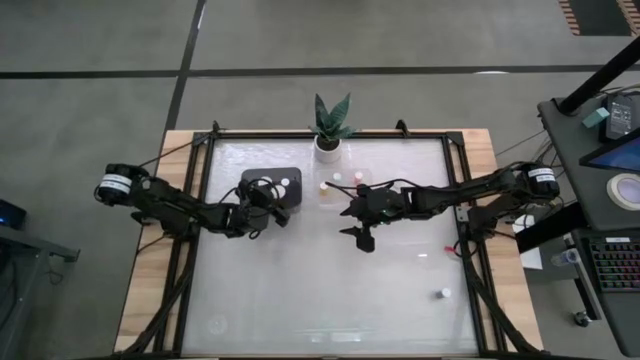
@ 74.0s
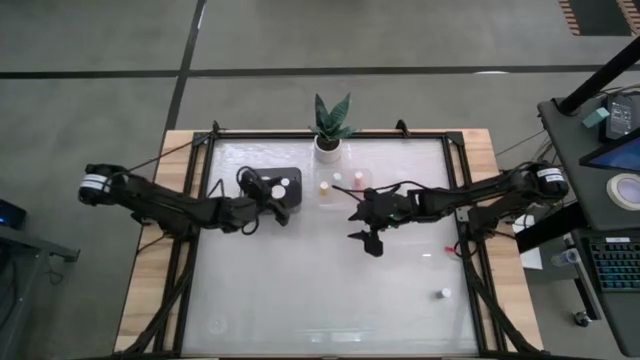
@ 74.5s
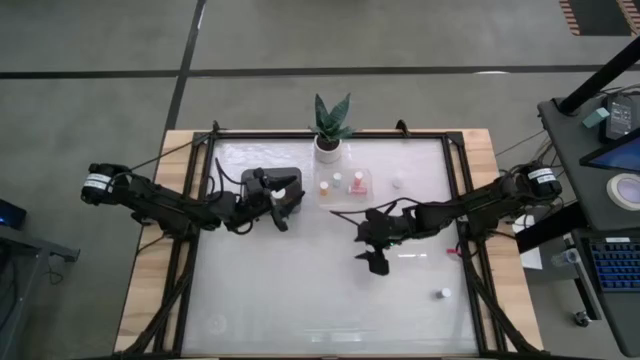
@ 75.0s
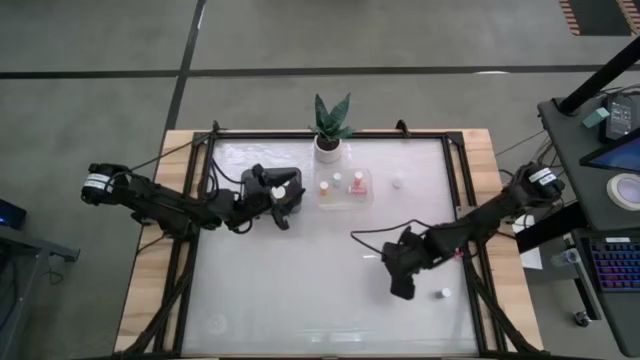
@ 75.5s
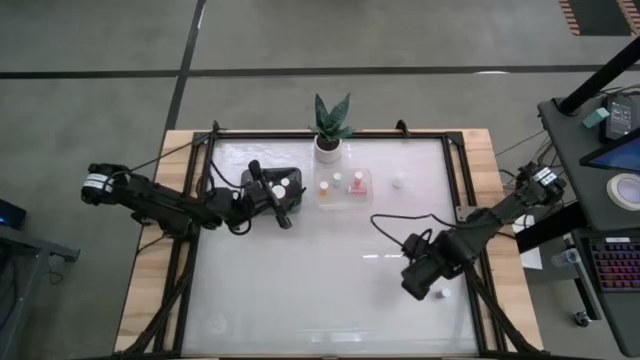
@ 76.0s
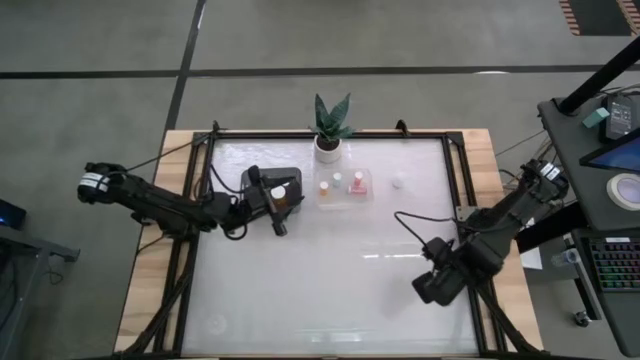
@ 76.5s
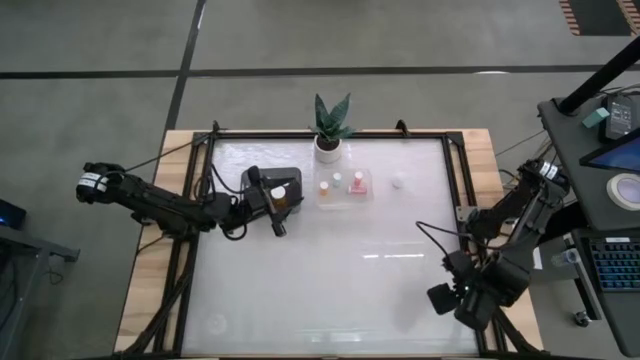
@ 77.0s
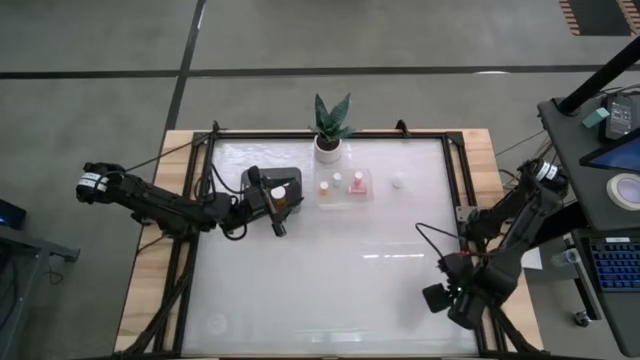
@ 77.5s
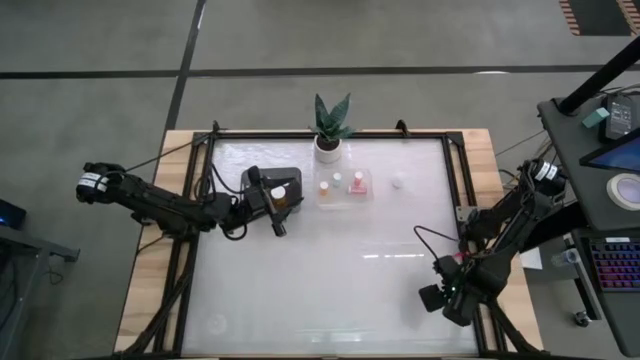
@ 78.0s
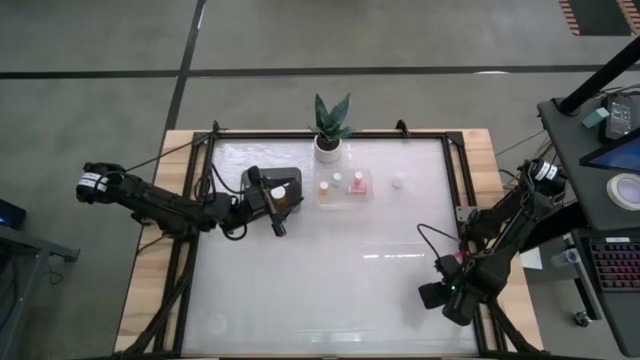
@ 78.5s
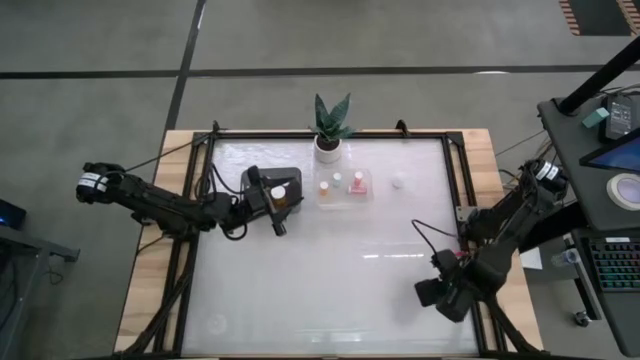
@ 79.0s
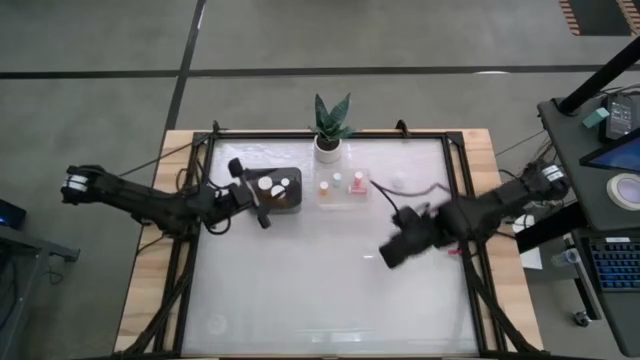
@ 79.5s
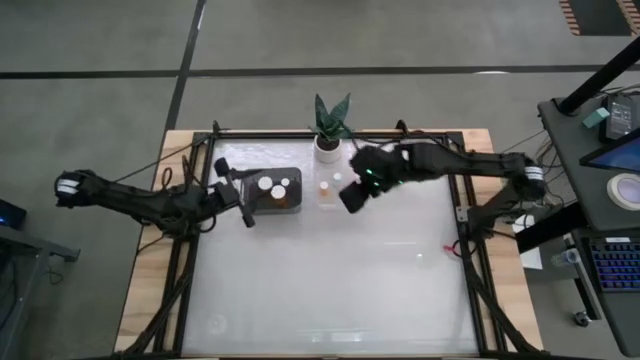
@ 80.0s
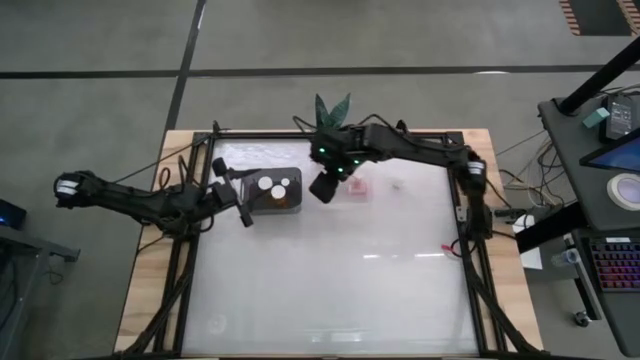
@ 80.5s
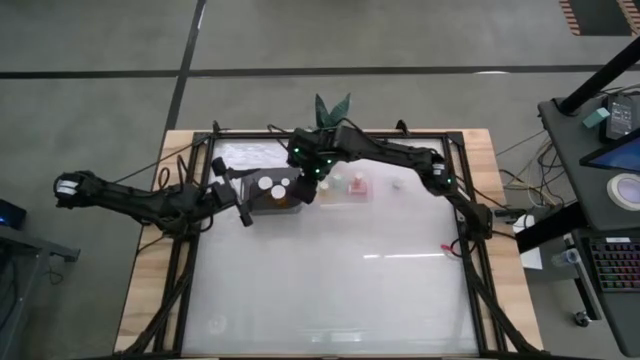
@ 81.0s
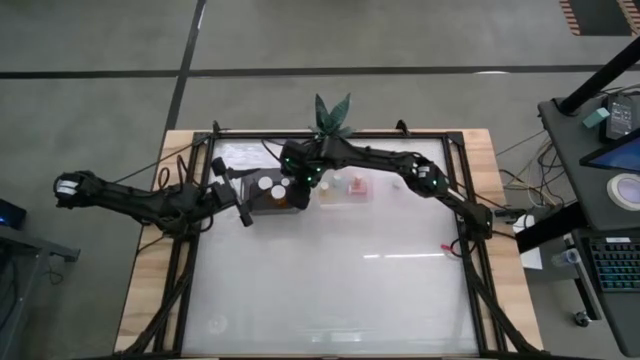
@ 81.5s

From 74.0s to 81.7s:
Task: Pick and place medicine bottles into bin by pill shape (circle, oval)
Put the blue capsule bottle into the black bin

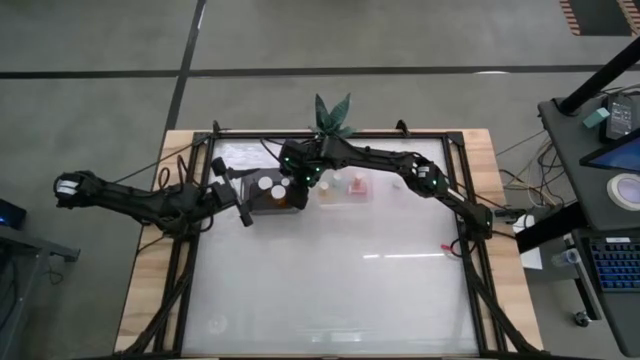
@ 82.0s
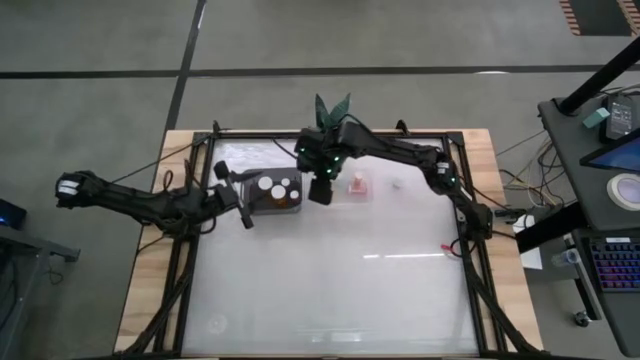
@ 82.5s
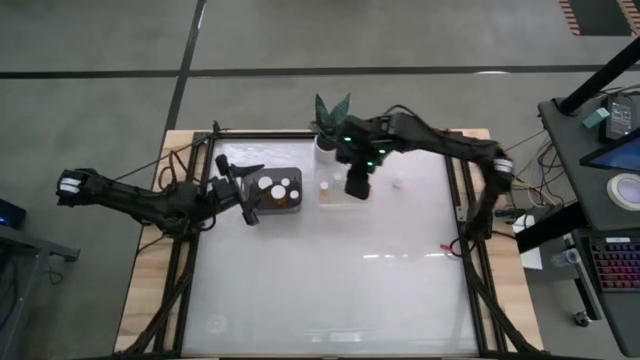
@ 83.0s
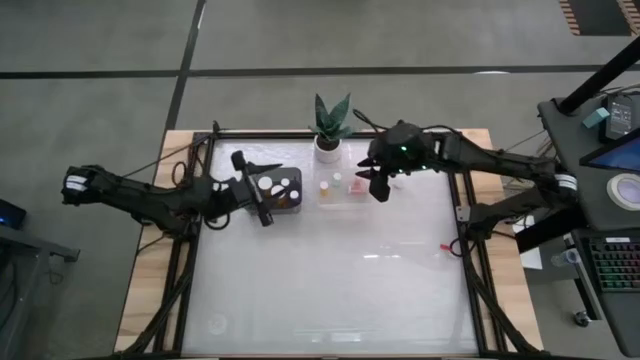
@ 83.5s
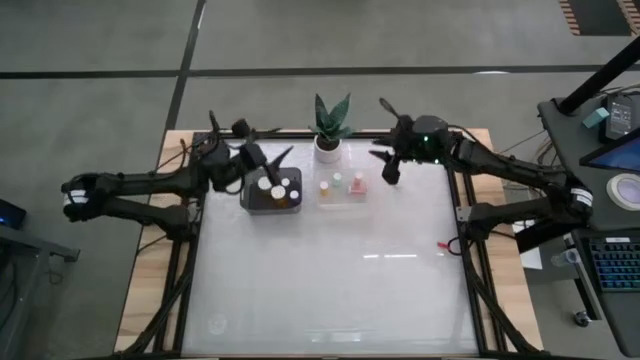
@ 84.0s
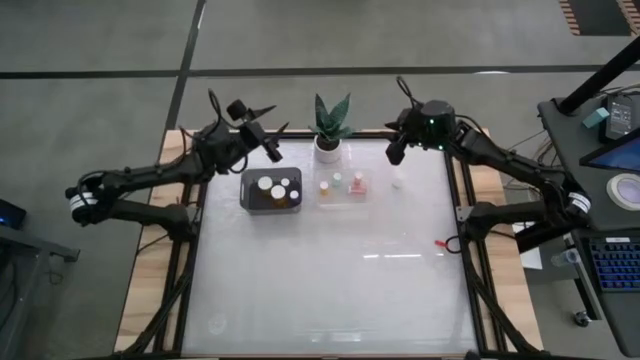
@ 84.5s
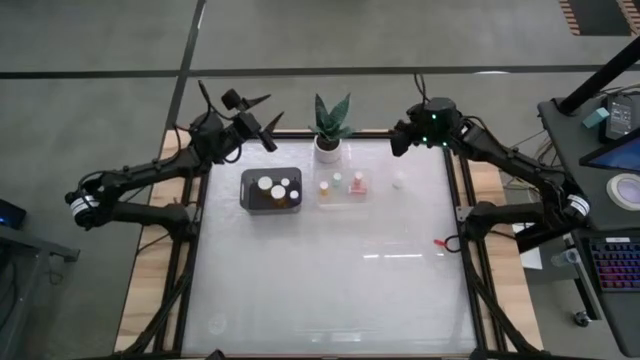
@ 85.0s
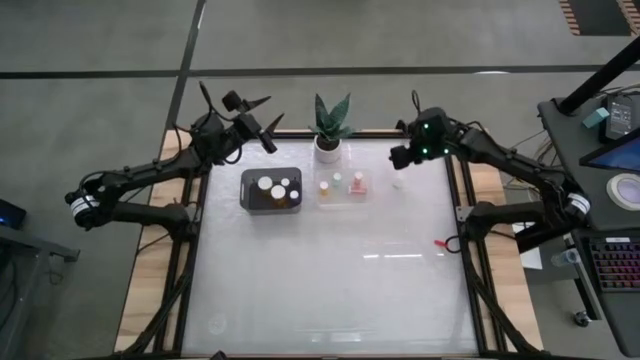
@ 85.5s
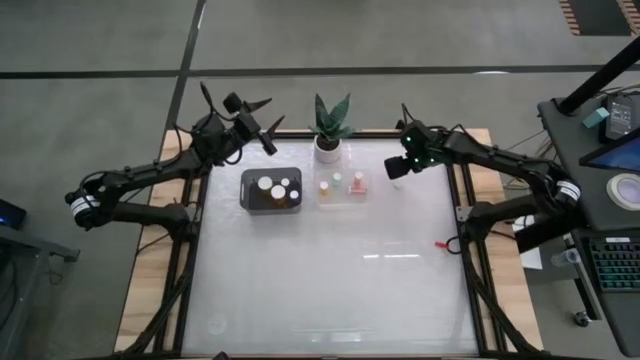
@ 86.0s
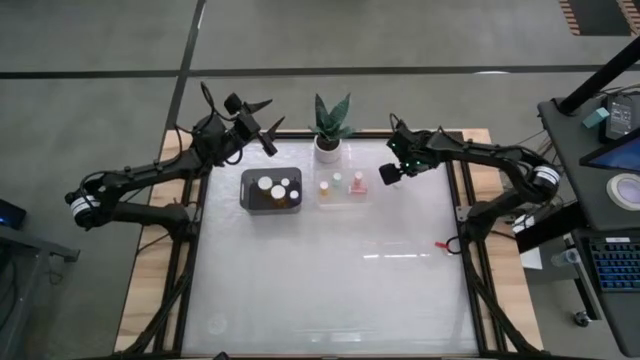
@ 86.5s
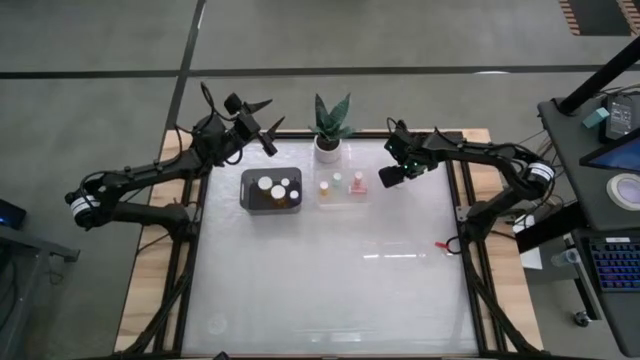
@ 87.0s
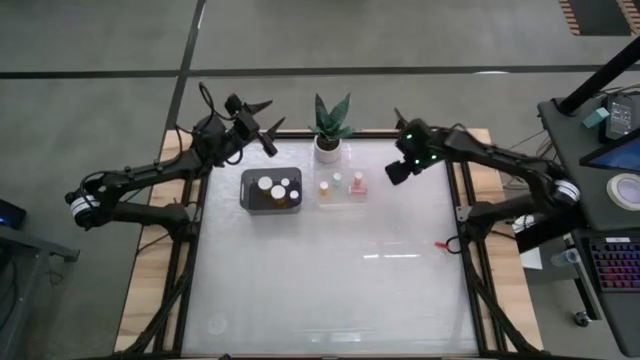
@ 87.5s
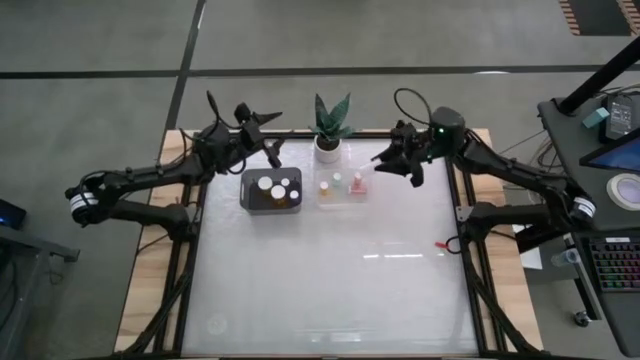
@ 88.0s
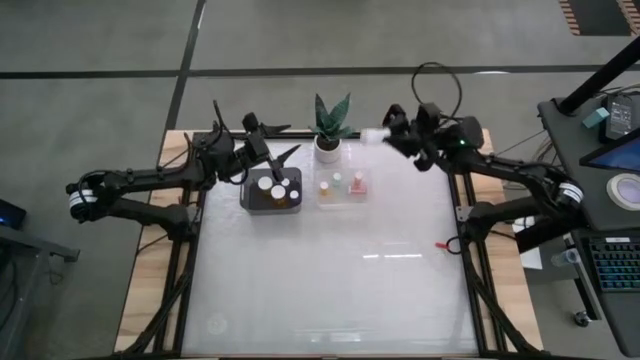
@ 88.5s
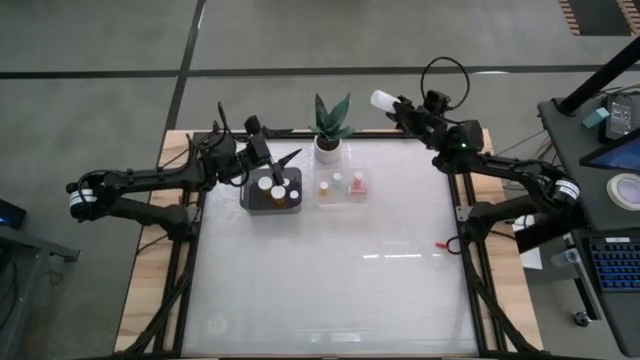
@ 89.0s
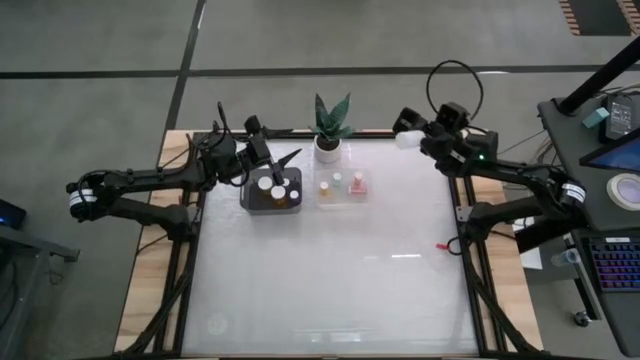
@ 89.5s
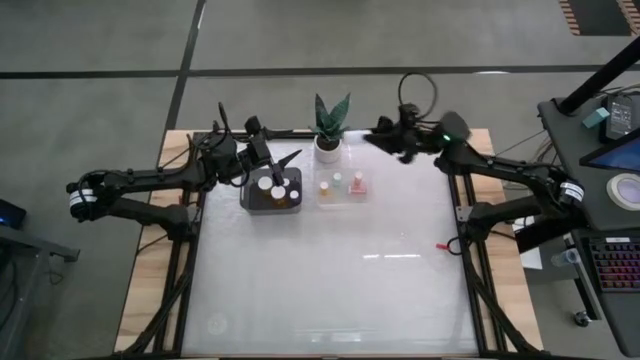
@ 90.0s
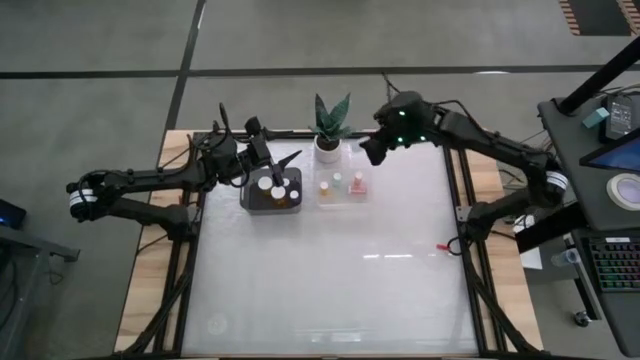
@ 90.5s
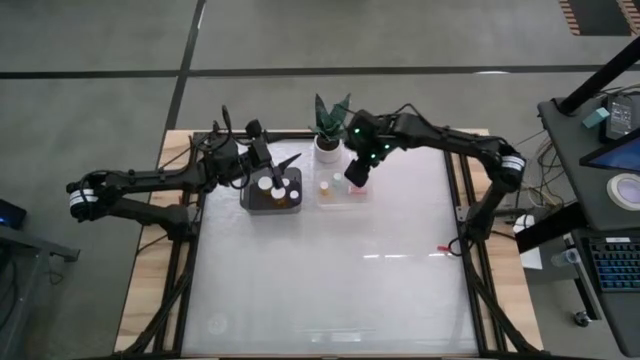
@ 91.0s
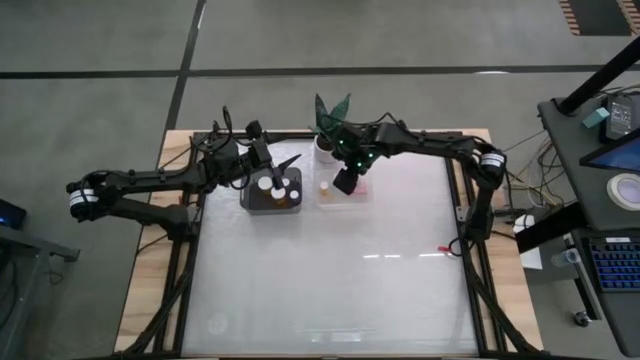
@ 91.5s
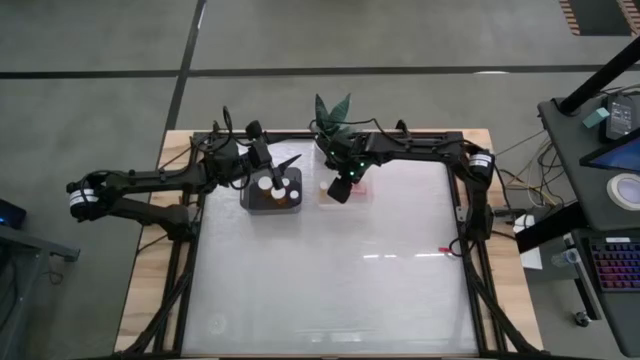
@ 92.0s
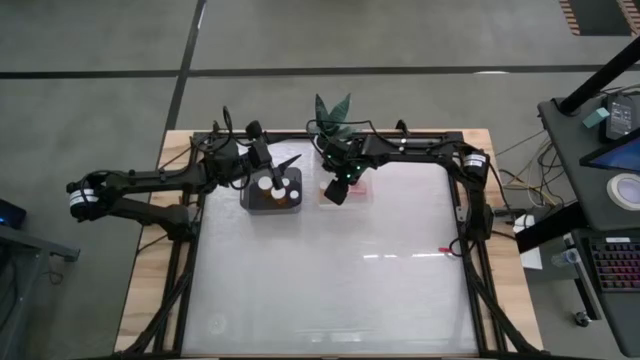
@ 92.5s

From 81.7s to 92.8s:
Put the white tablet bottle into the transparent bin

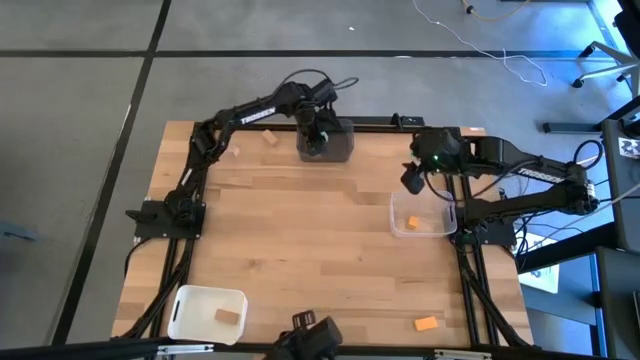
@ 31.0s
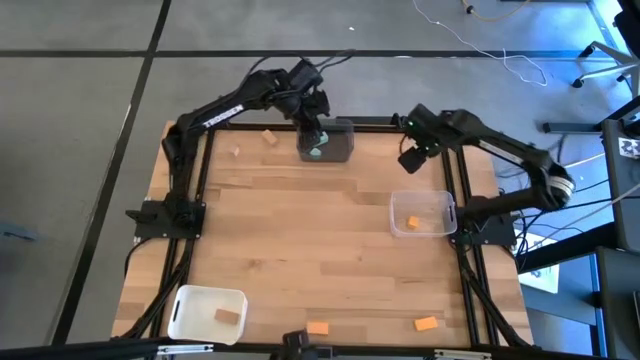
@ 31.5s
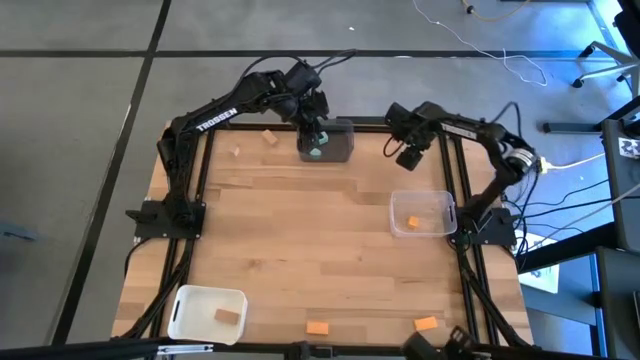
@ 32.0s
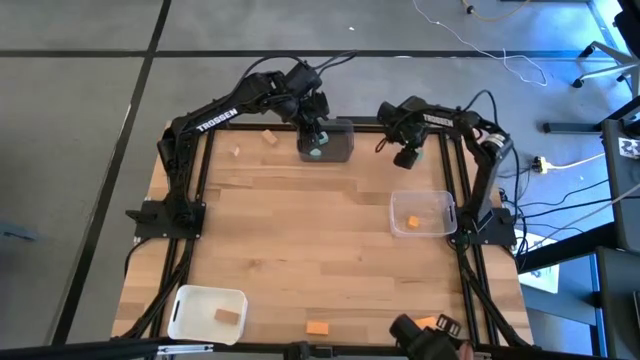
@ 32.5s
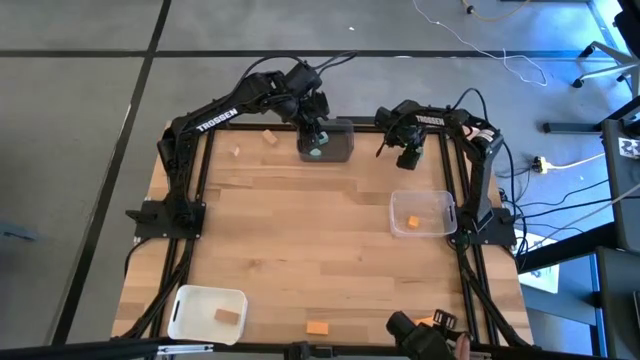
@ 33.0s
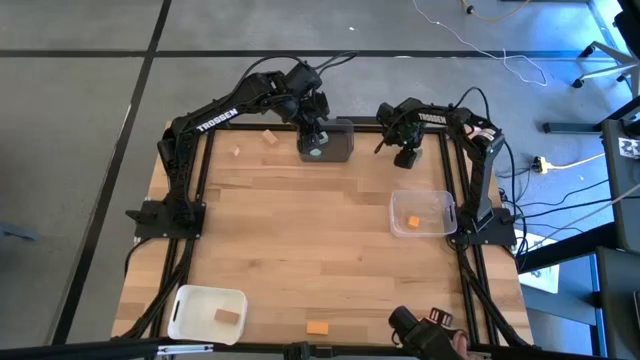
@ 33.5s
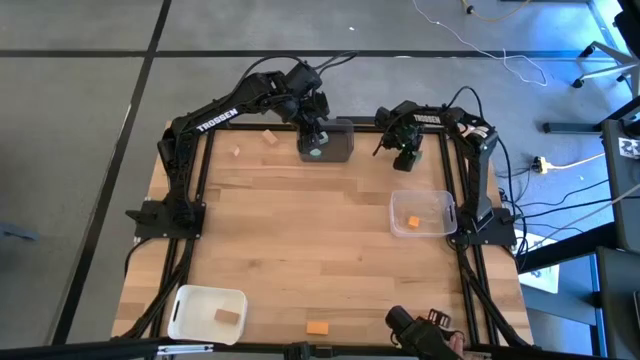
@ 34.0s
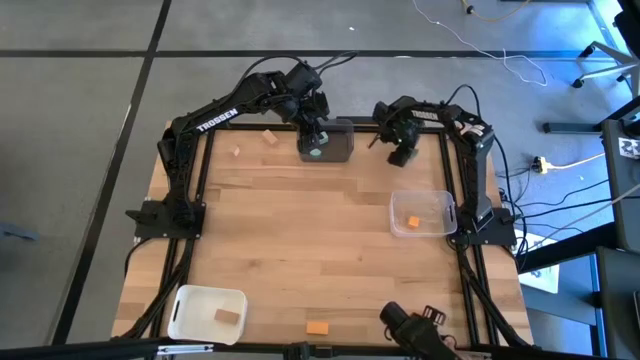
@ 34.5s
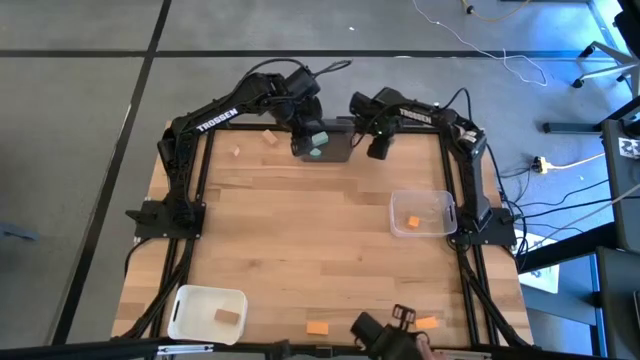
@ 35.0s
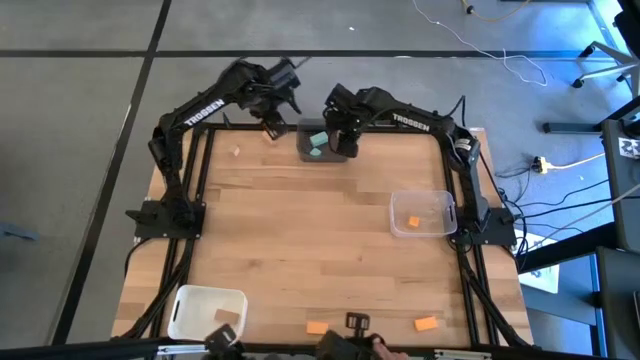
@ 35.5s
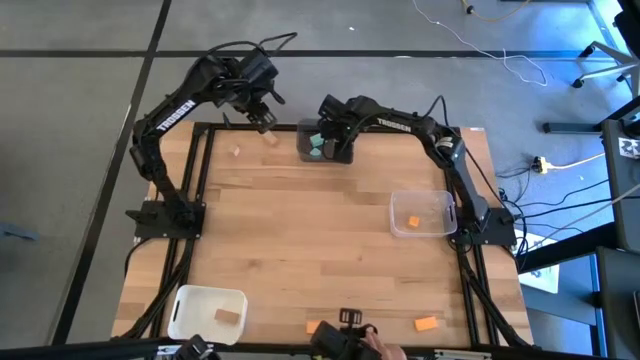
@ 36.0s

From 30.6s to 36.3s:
Task: Sort & place blocks by color
Put the blue block into the black bin
